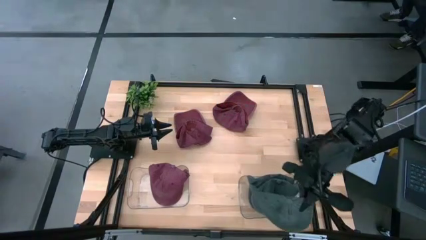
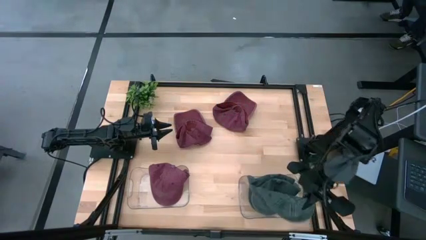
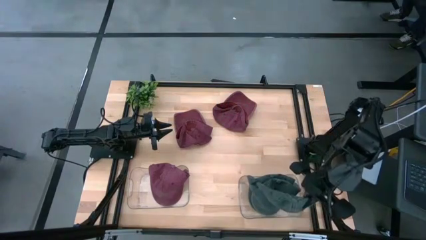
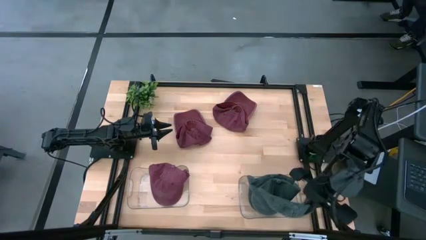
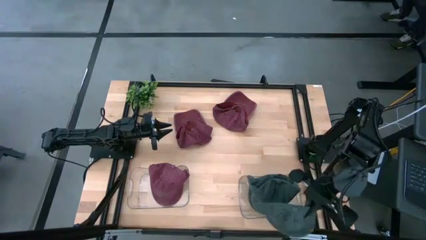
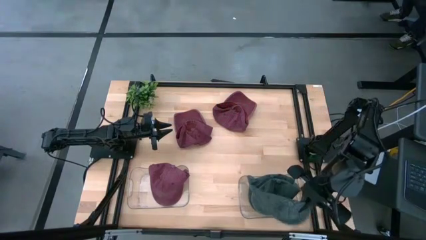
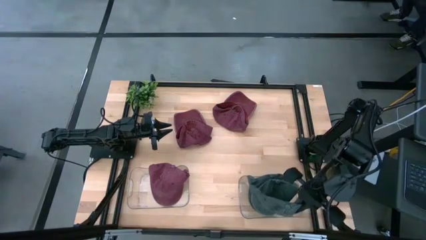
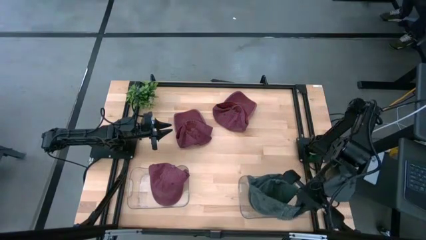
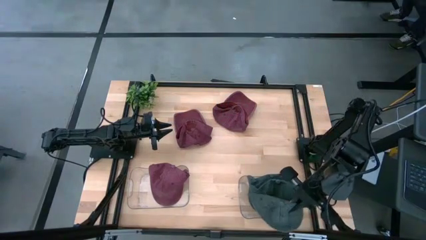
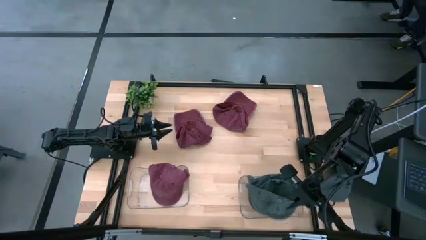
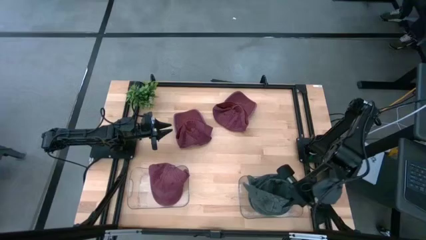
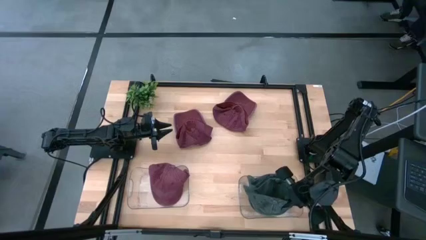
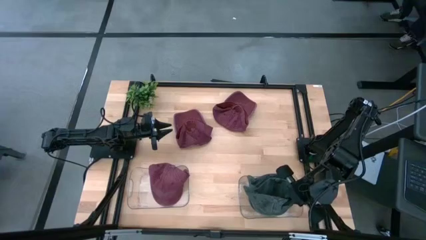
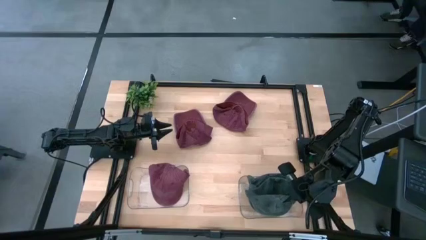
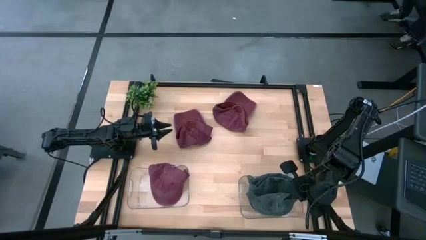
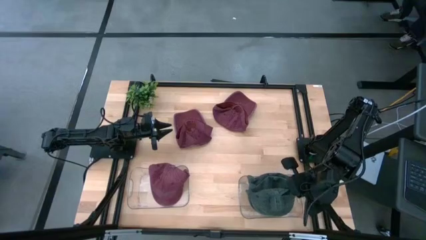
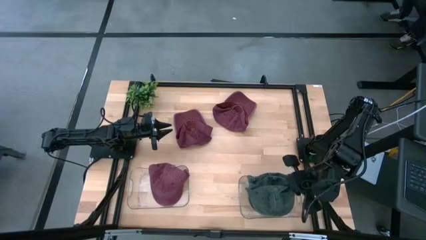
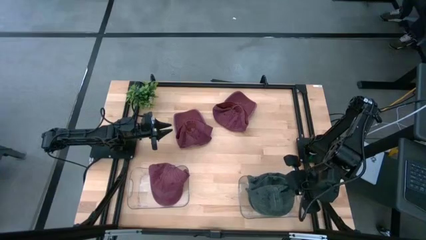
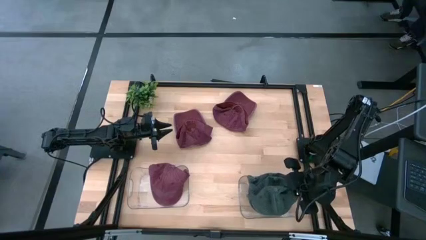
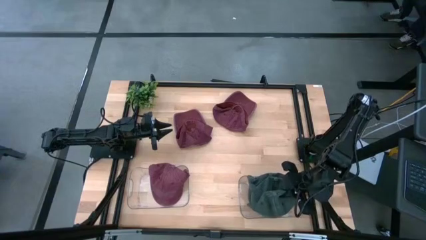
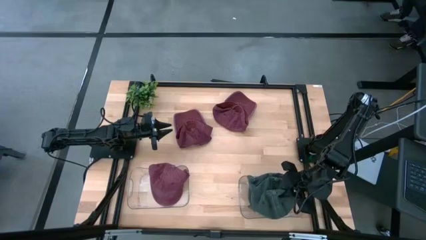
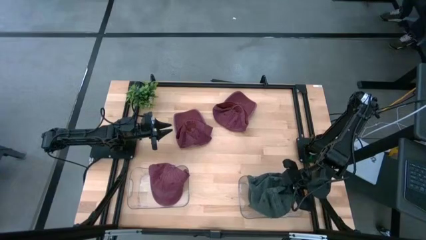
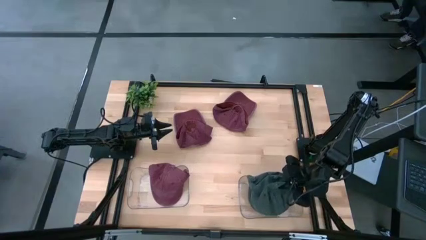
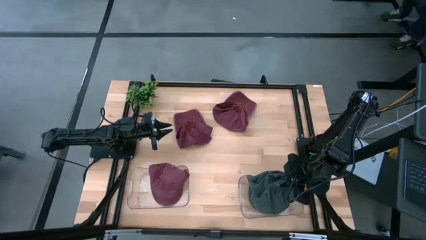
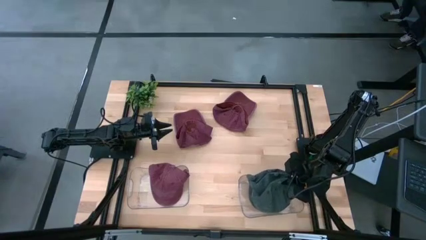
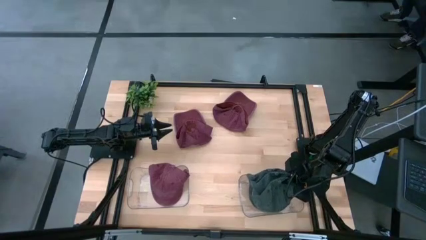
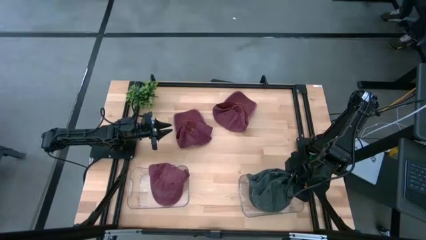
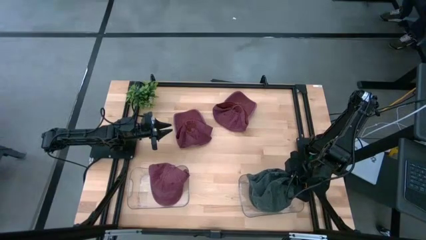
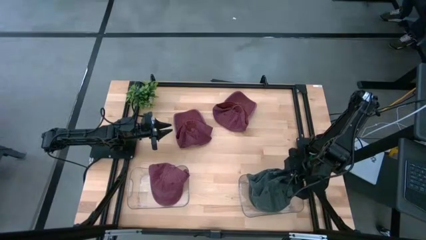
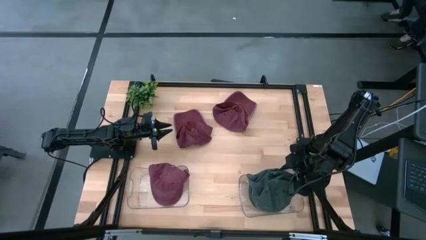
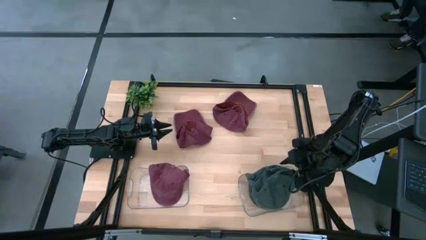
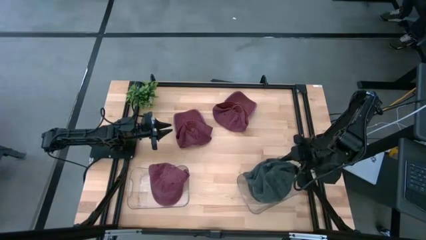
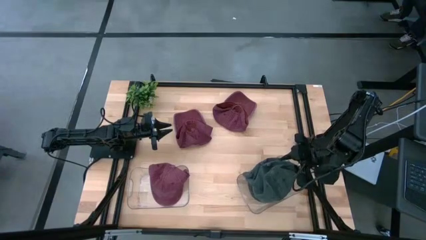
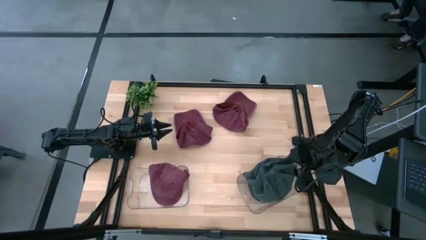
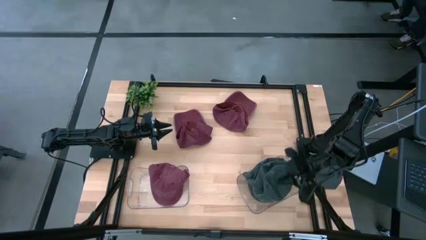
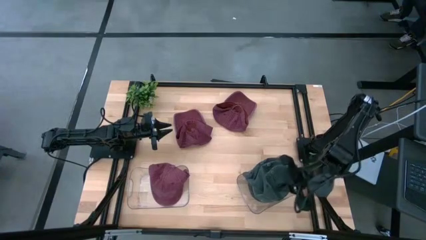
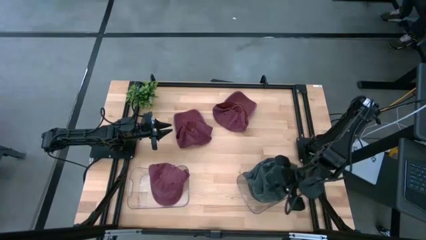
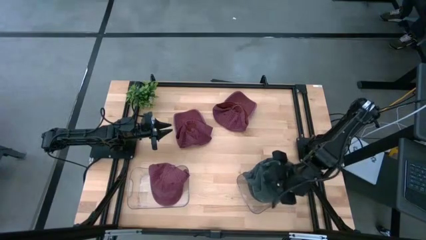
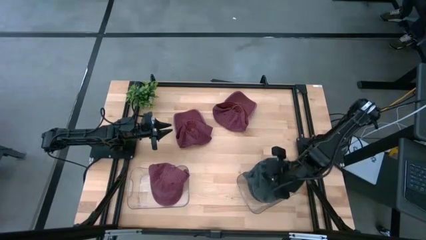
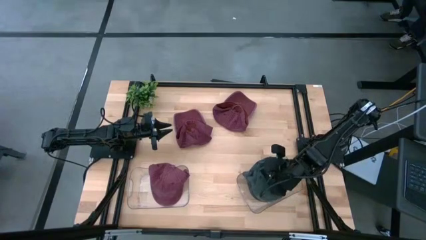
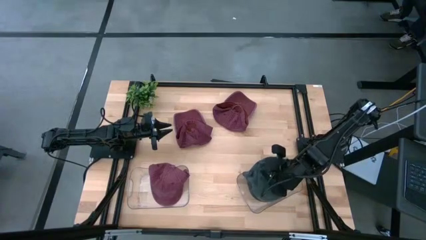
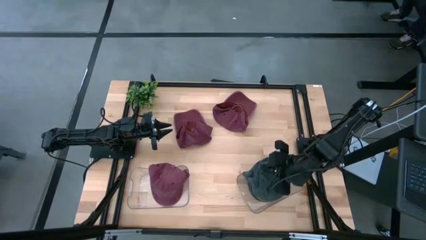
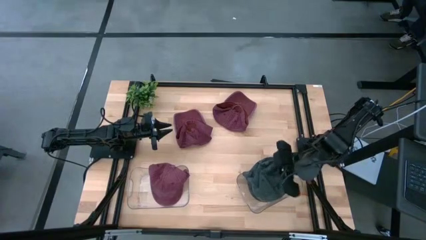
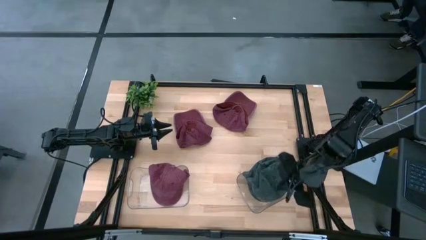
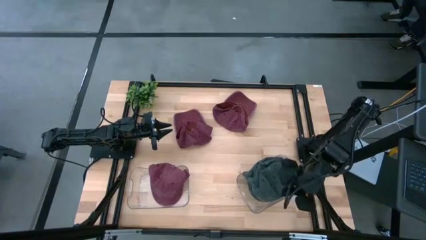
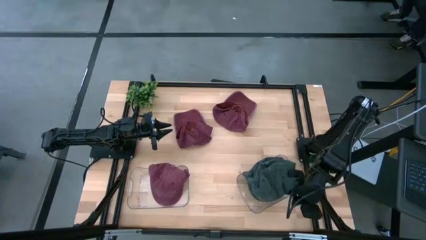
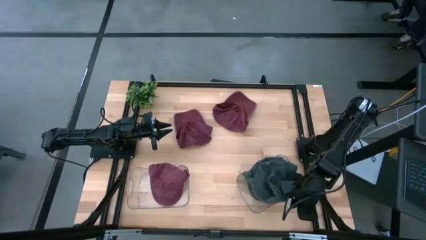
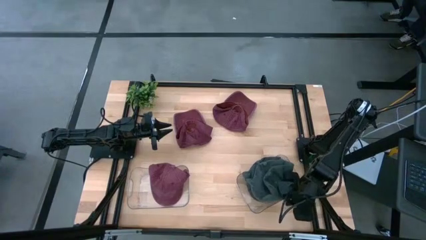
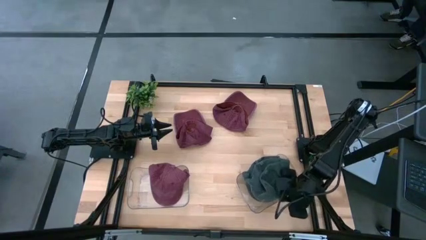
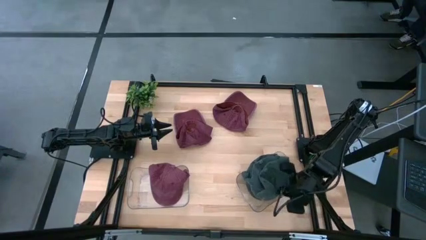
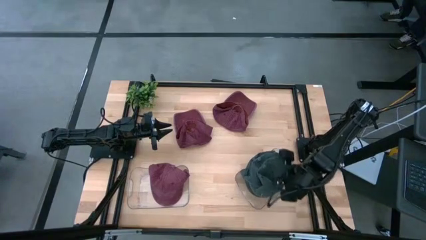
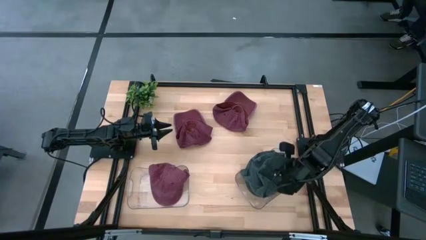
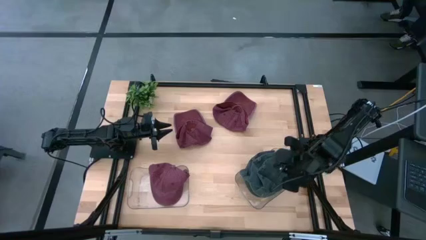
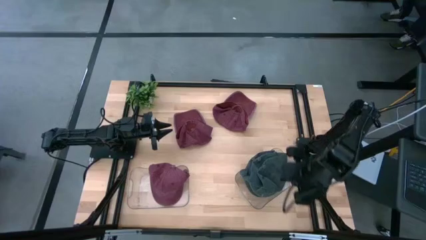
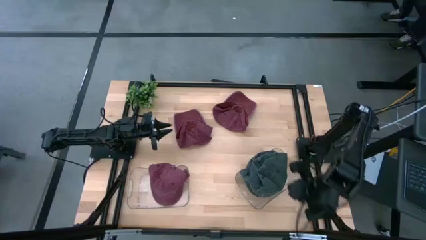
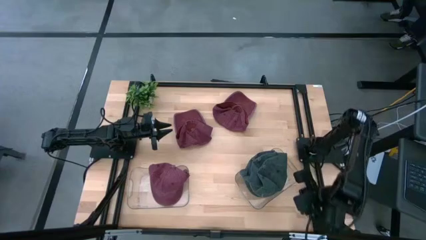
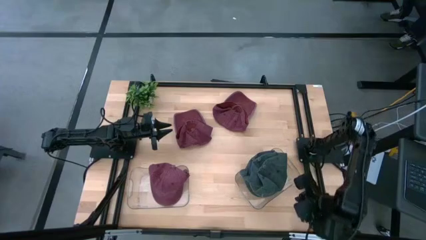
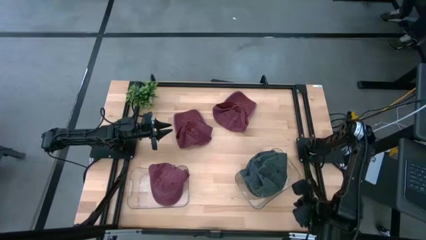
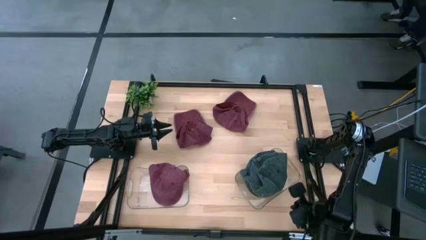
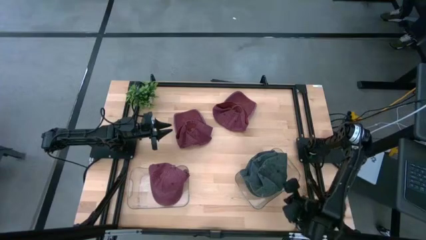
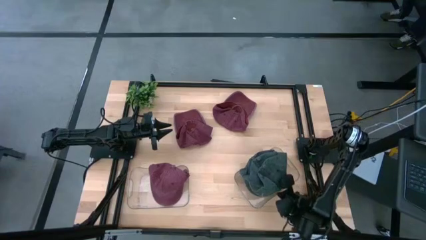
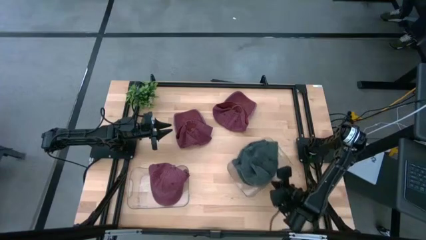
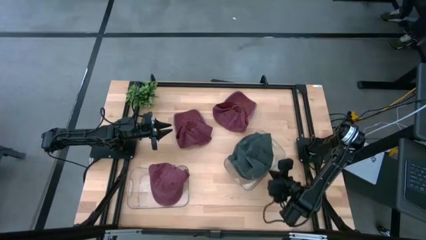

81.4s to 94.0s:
Task: Pick & Place hat
Put the black cap into the right transparent bin

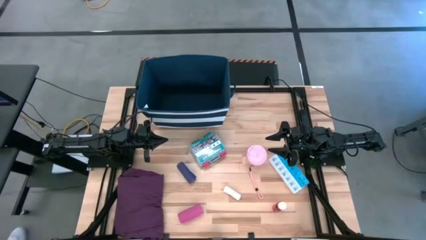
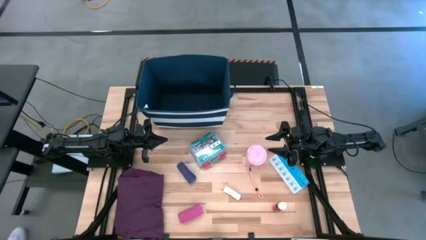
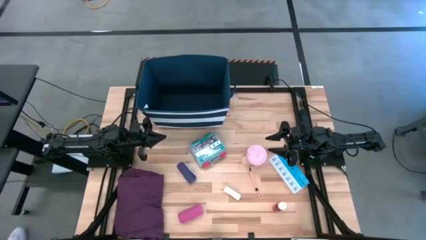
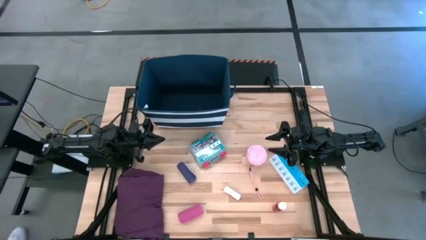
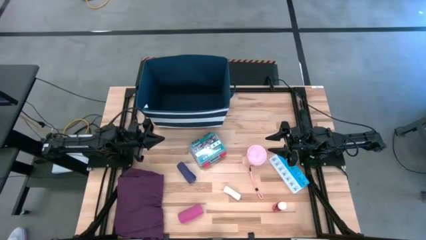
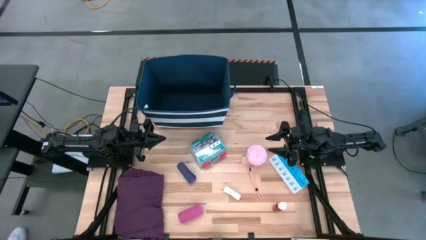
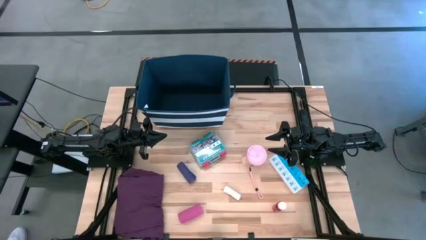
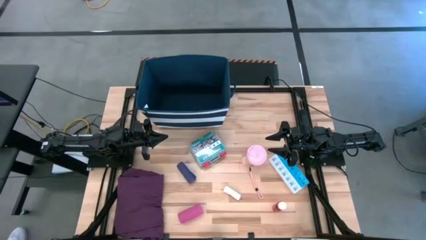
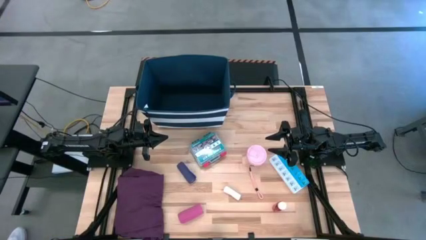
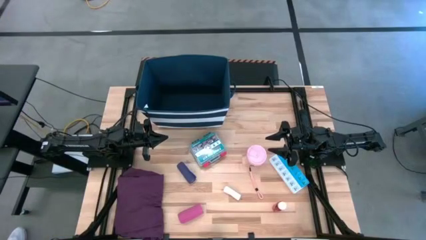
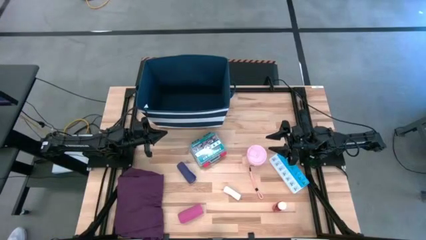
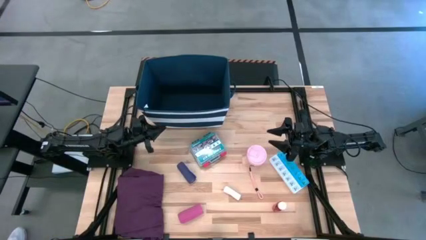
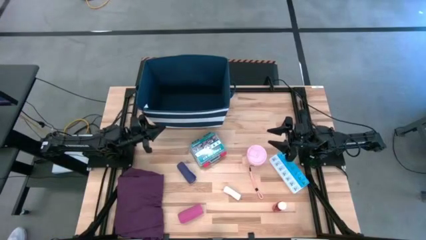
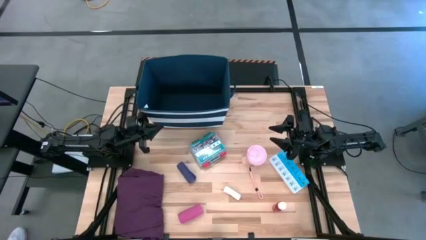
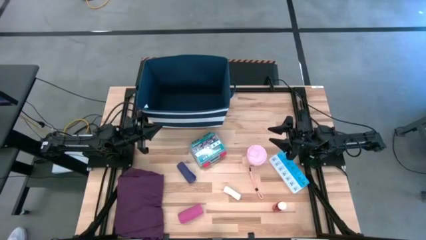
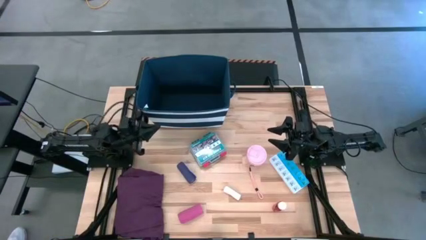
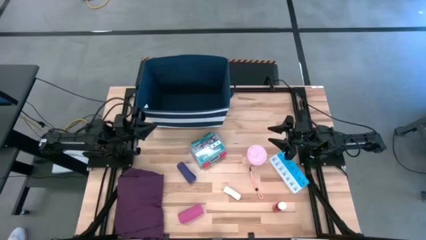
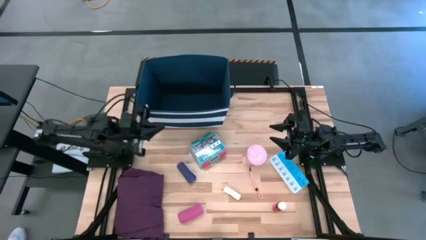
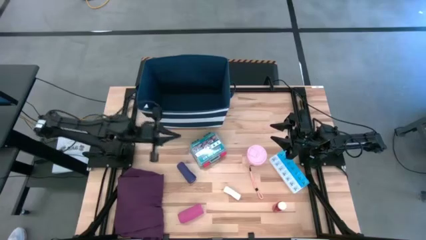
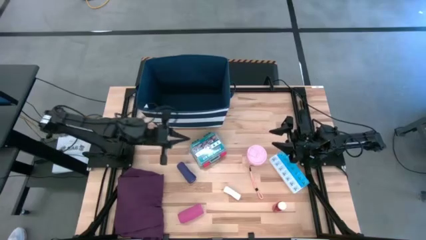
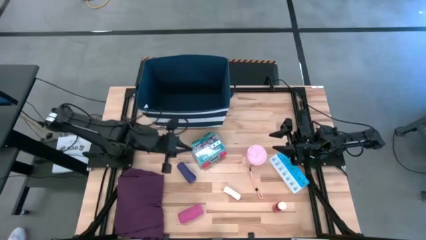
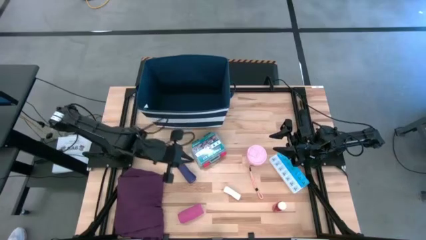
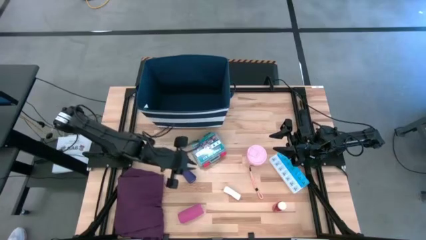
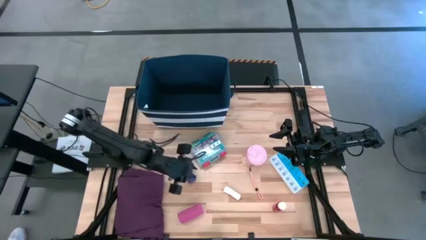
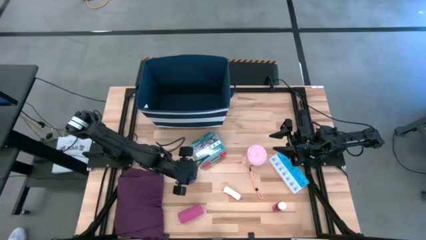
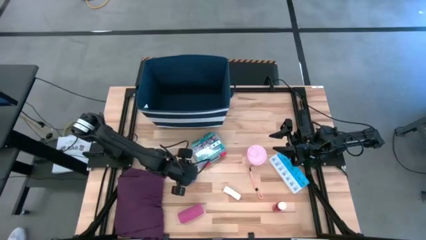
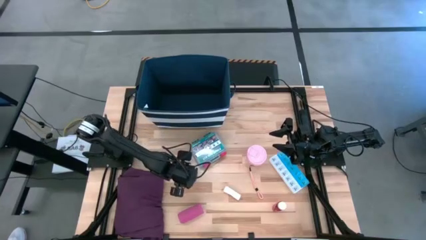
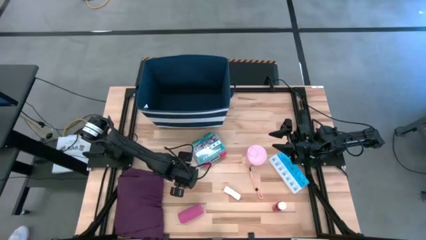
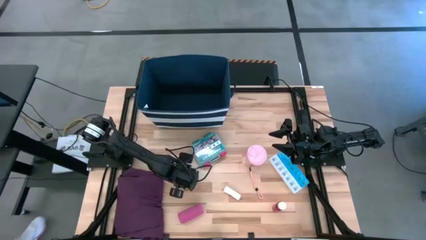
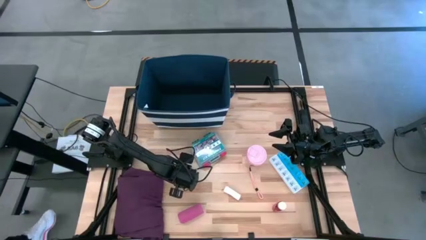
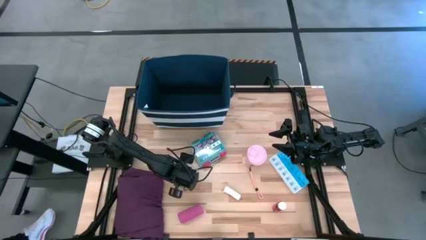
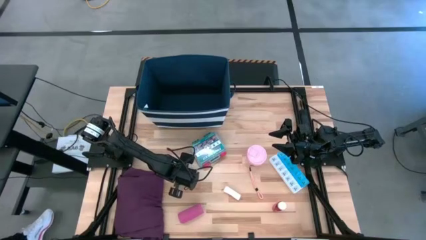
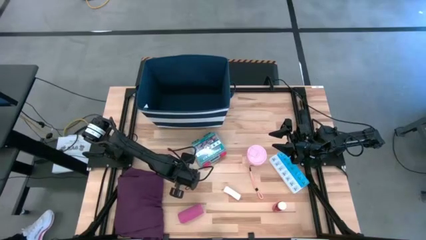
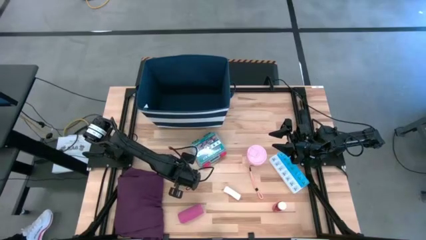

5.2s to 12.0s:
Task: Pick & place medical supplies in basket/bin
Put the violet bandage into the blue bin
